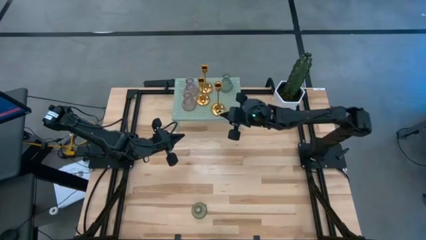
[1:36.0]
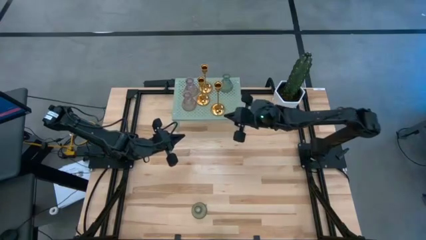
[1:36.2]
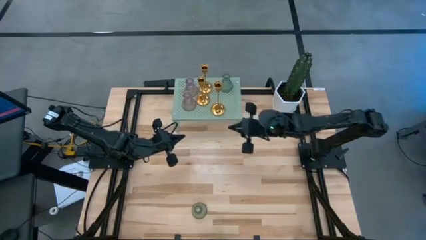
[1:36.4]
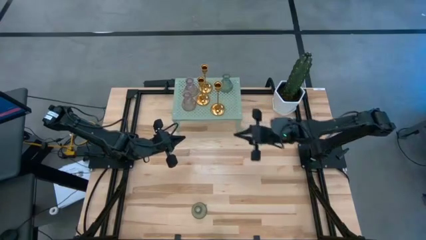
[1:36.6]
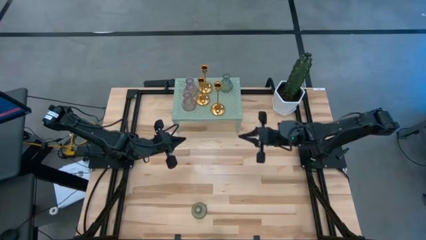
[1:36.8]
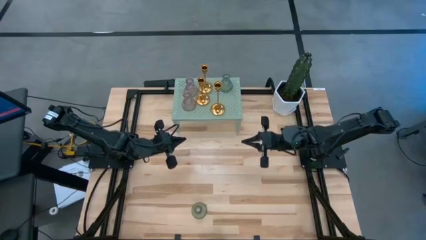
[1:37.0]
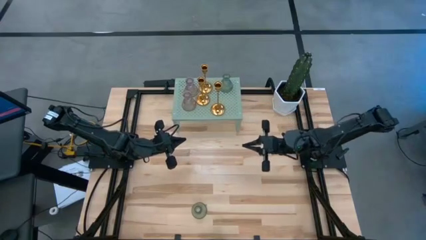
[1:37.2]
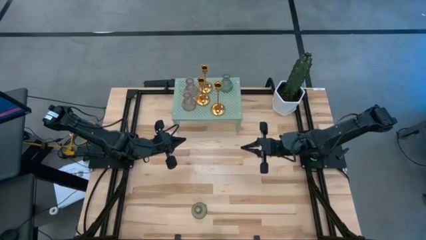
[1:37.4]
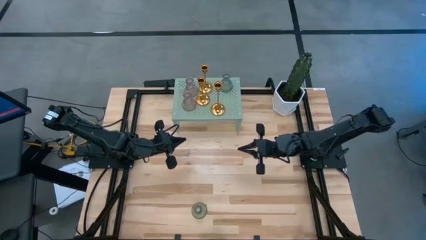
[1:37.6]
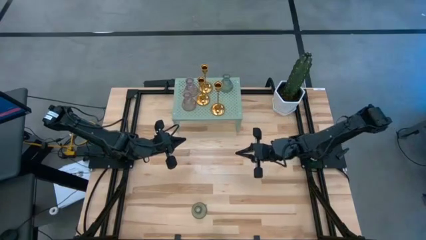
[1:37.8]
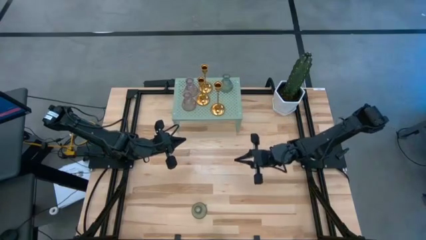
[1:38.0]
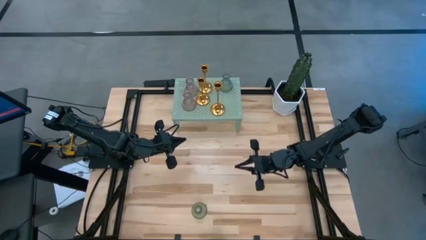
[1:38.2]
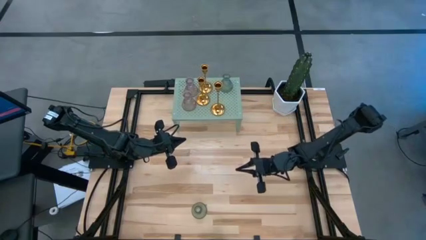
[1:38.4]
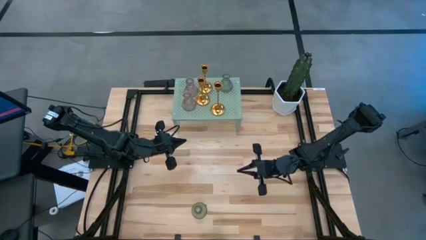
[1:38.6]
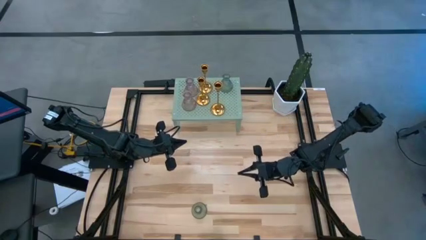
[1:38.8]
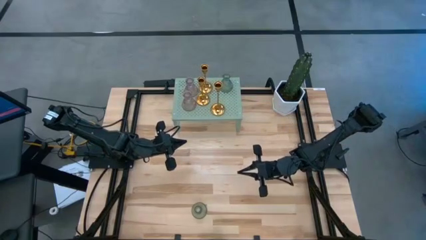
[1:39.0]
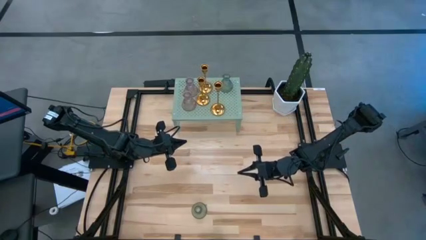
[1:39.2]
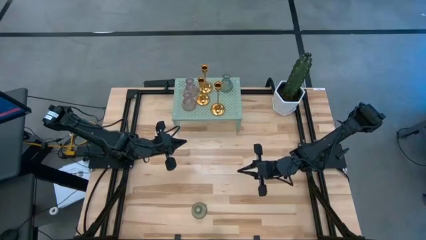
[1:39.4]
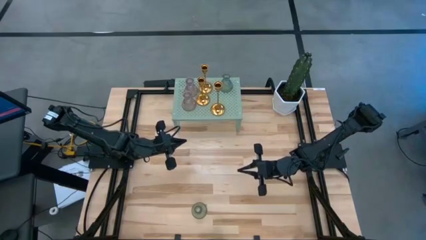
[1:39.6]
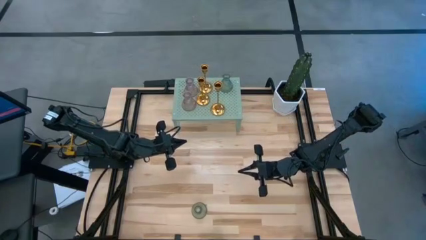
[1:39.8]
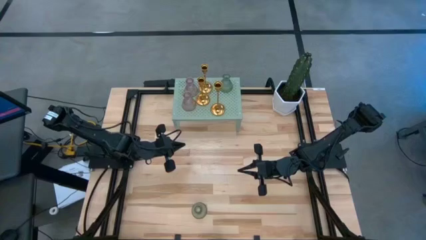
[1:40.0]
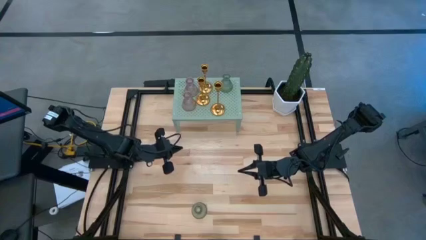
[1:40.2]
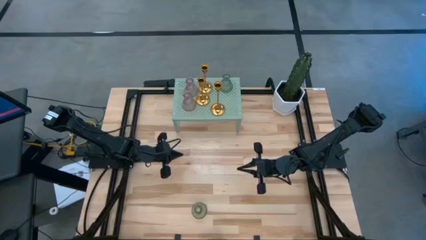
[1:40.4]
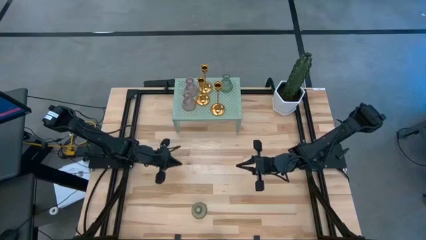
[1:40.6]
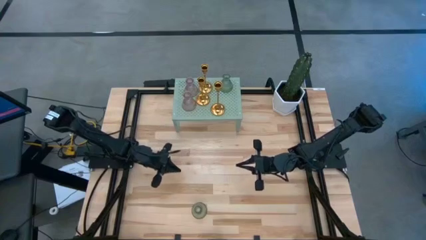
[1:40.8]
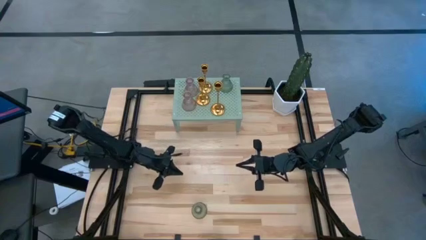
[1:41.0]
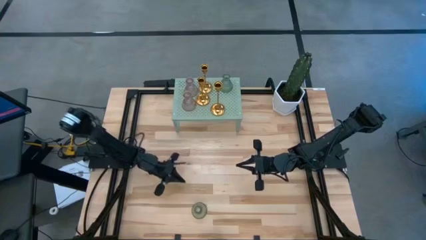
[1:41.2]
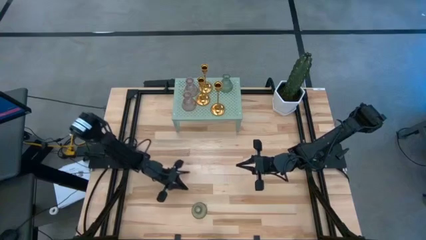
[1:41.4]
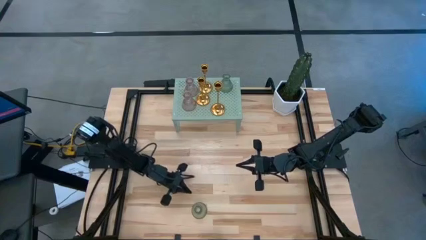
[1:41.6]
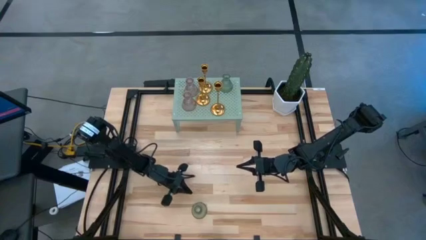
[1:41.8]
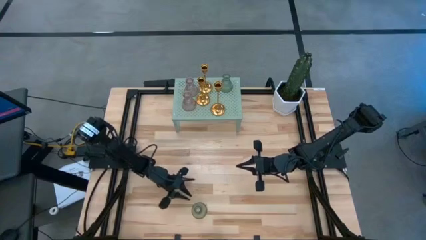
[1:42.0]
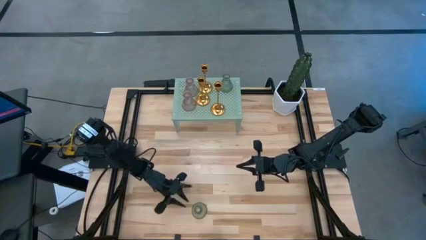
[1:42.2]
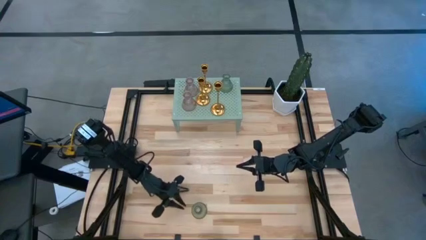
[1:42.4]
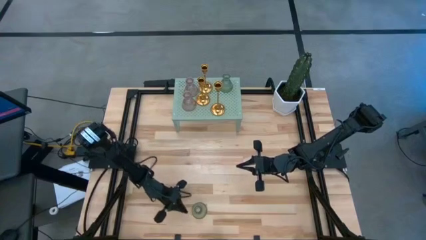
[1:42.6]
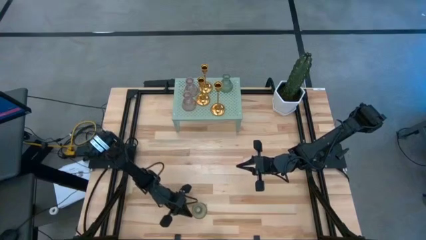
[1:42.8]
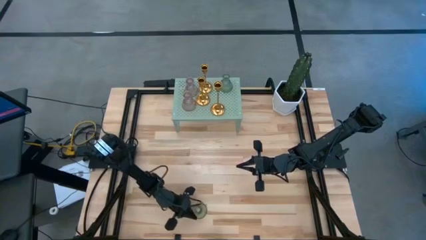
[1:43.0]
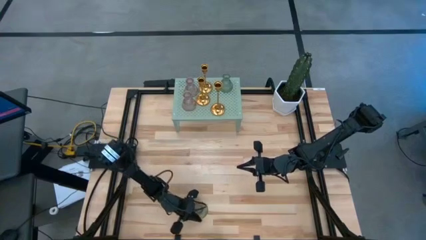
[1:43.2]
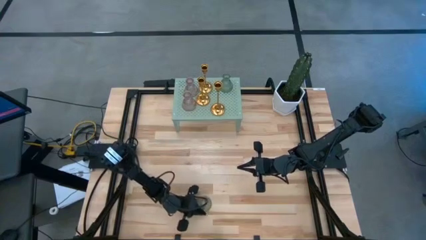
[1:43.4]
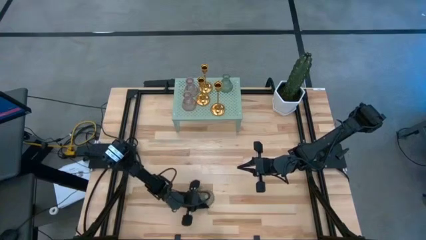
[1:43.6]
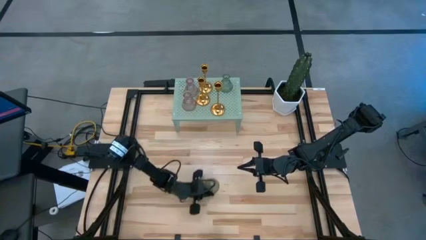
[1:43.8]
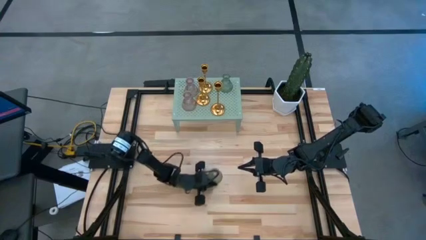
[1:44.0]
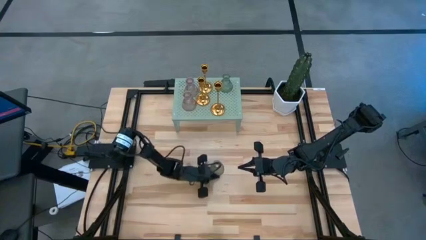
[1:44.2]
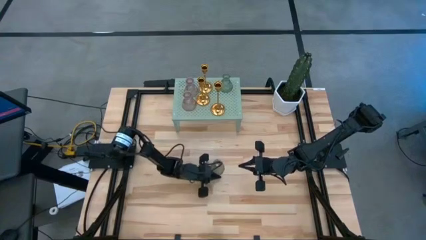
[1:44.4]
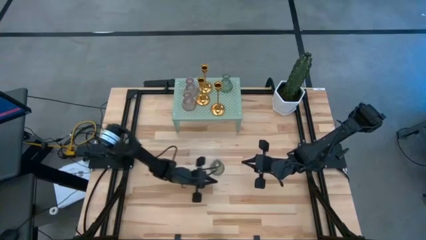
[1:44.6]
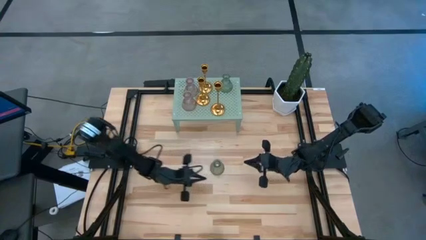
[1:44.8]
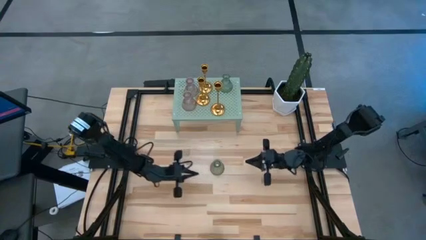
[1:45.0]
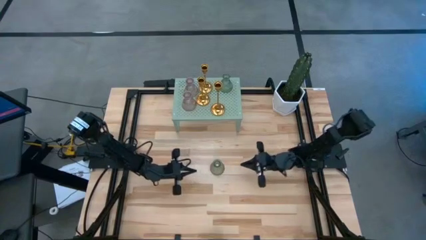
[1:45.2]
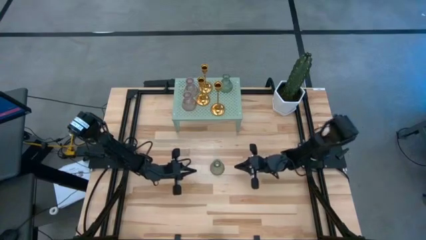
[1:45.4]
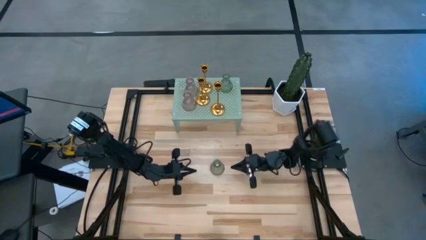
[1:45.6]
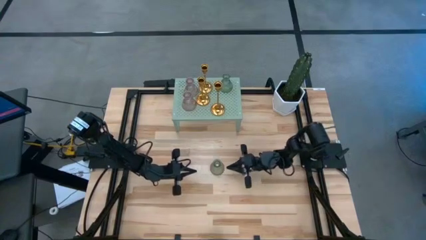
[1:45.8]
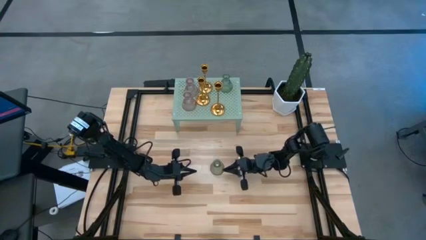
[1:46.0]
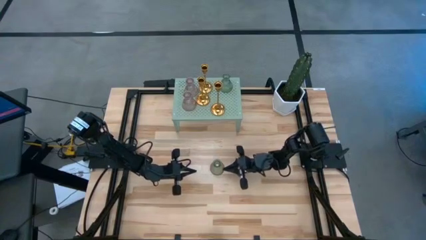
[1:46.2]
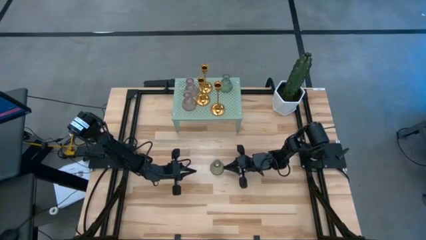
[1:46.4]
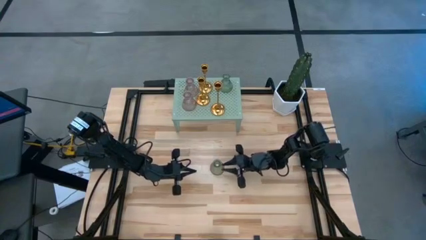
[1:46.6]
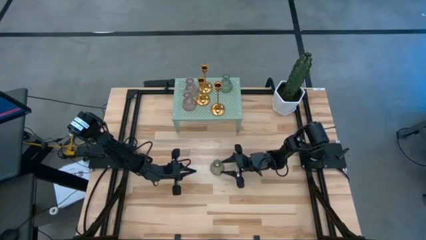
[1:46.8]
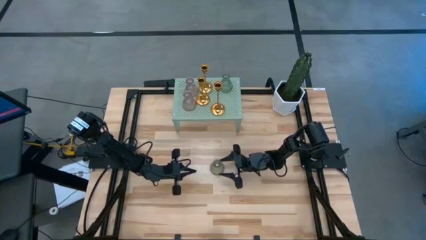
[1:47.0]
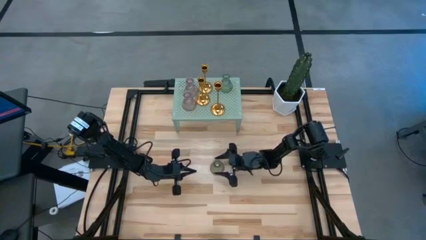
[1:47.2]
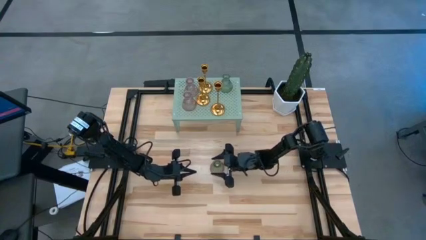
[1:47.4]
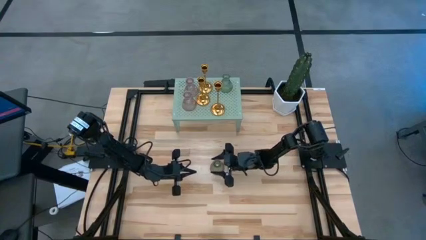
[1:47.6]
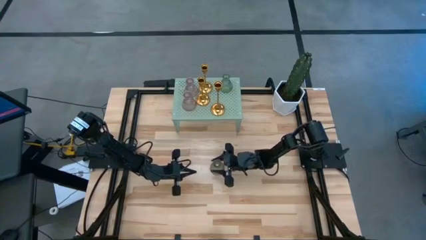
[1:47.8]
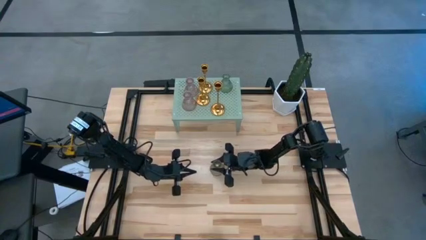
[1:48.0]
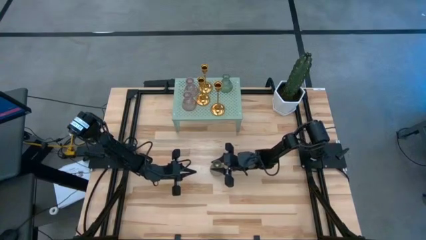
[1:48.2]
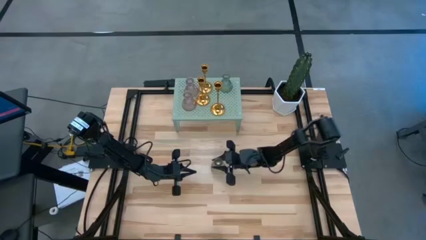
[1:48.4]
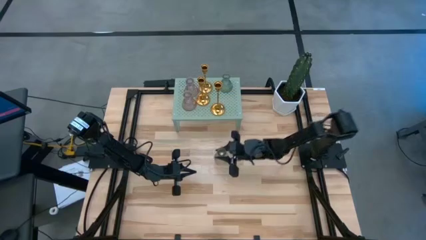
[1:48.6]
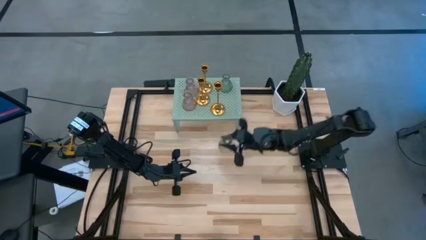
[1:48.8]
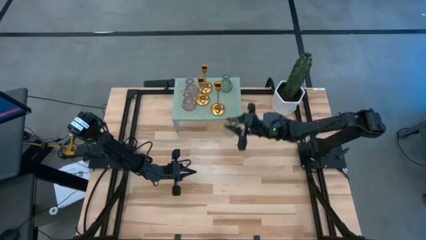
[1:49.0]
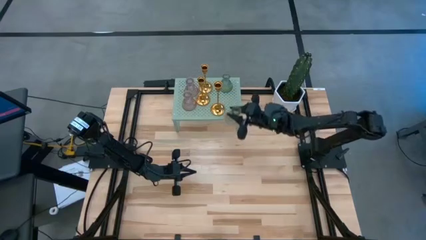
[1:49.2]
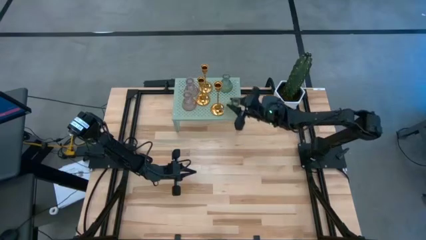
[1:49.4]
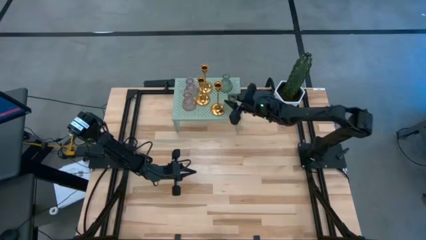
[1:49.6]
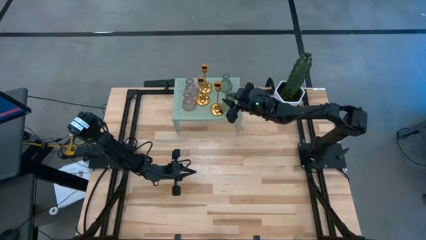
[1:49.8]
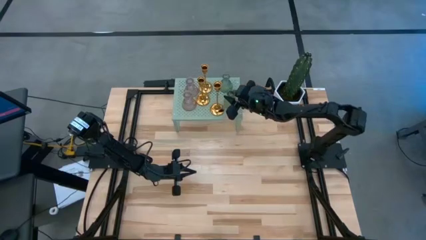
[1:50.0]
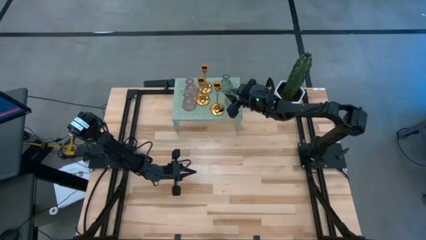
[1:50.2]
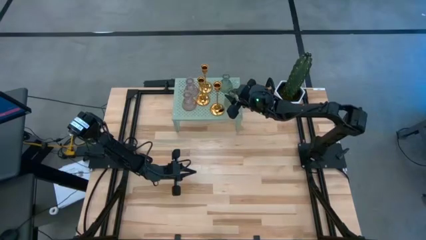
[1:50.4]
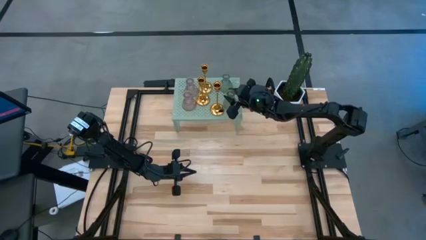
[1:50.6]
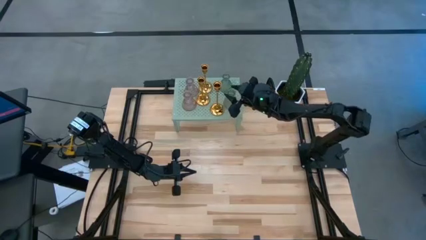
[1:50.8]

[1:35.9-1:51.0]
Task: Pick & Place candle stick holders
Put the green glass candle holder on the shelf
